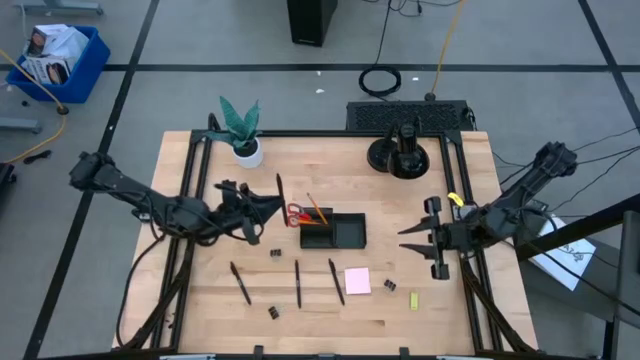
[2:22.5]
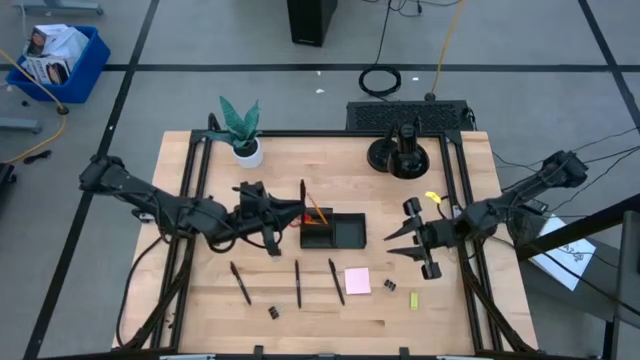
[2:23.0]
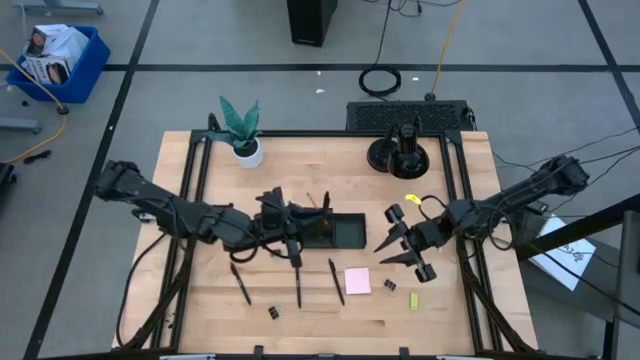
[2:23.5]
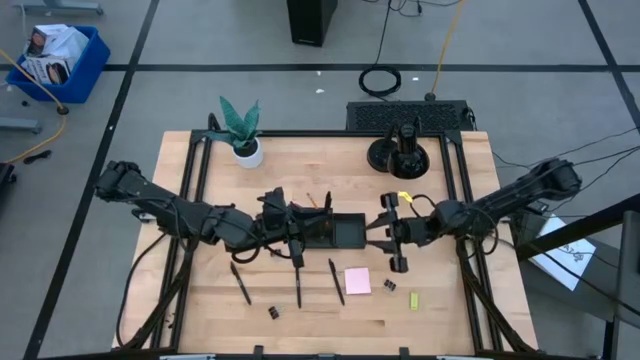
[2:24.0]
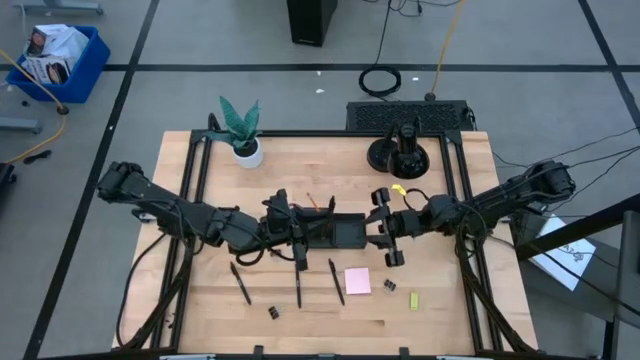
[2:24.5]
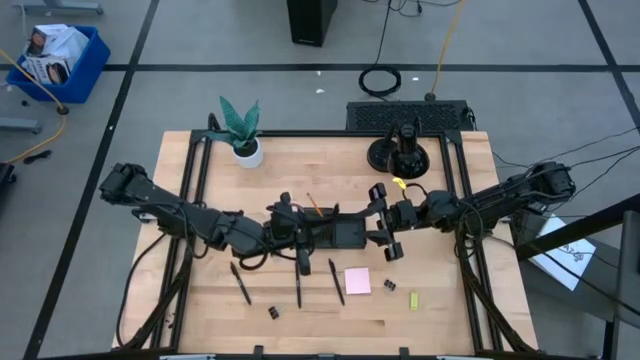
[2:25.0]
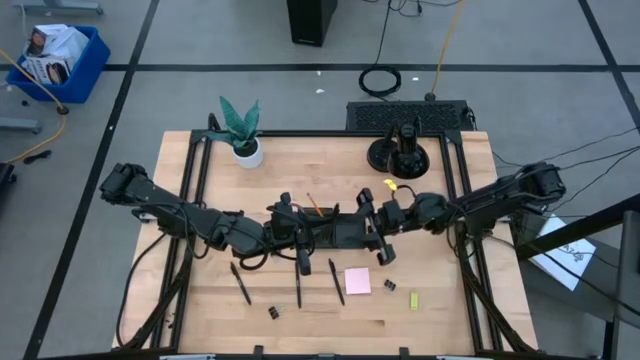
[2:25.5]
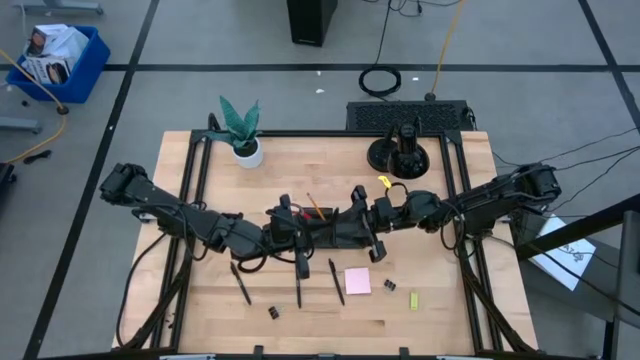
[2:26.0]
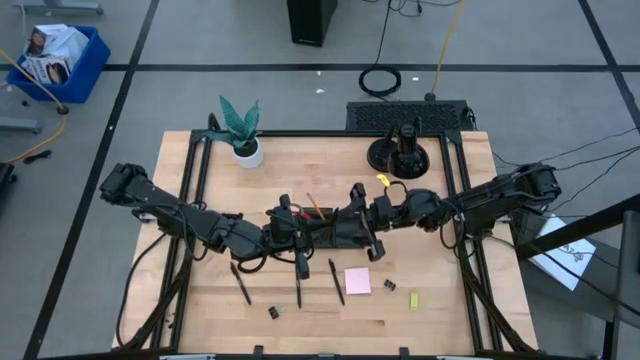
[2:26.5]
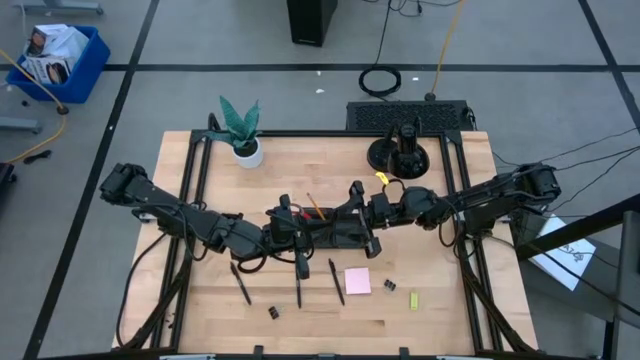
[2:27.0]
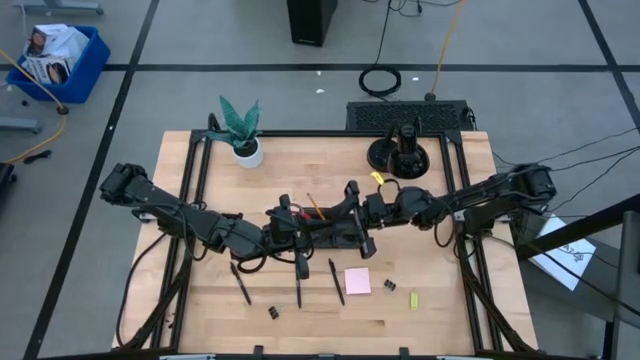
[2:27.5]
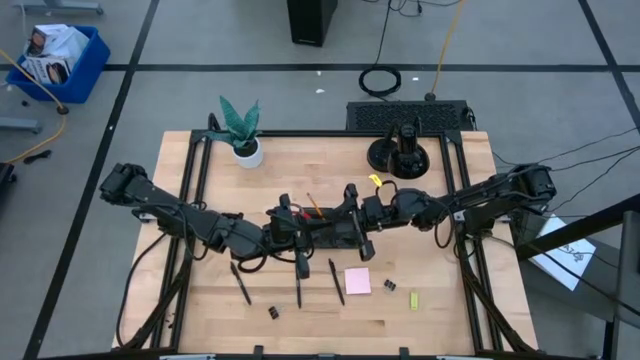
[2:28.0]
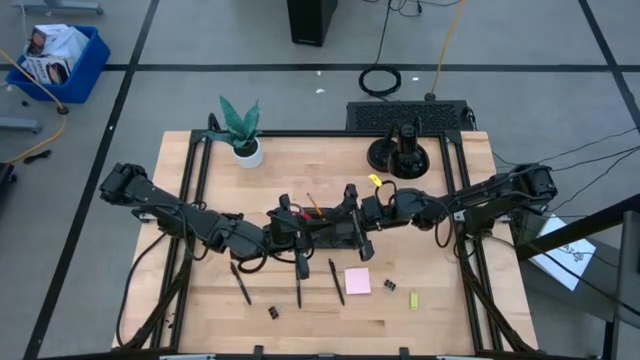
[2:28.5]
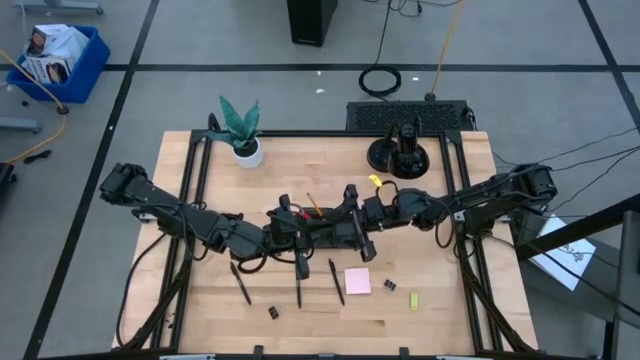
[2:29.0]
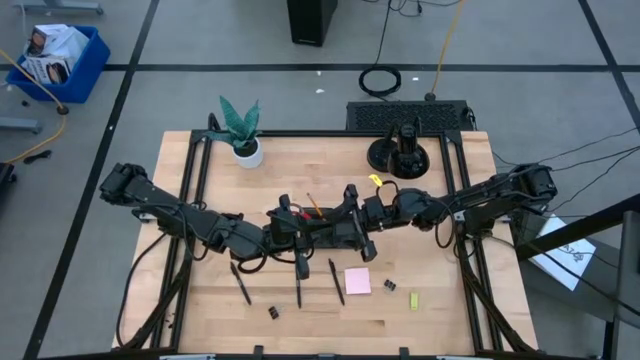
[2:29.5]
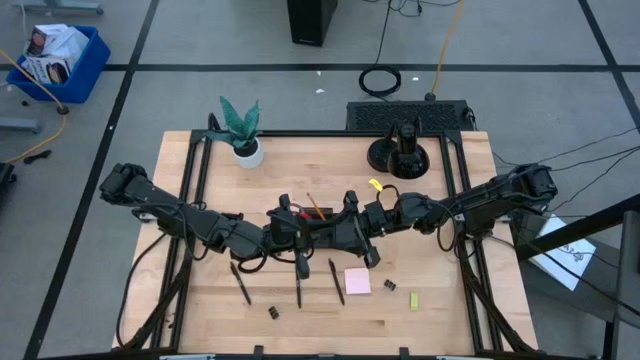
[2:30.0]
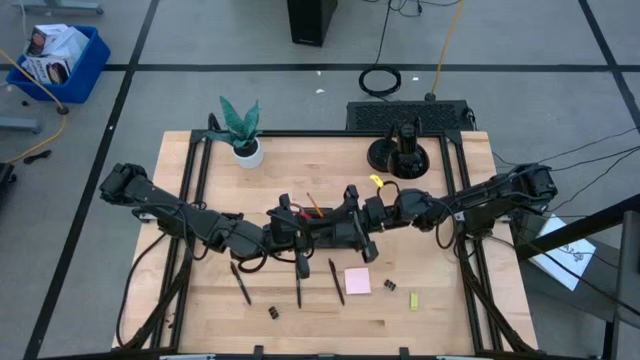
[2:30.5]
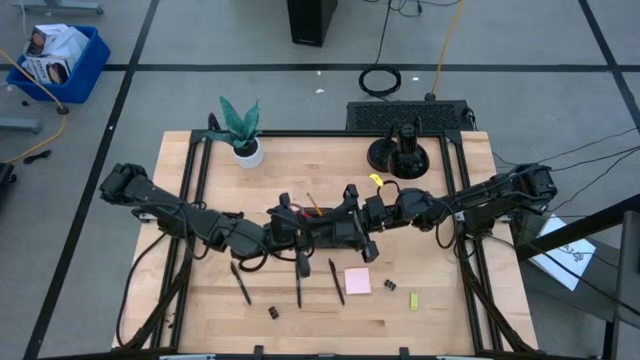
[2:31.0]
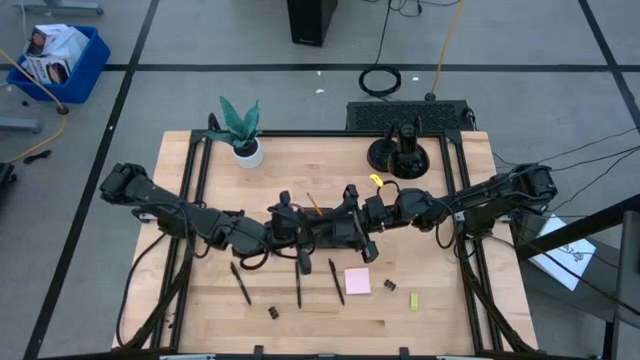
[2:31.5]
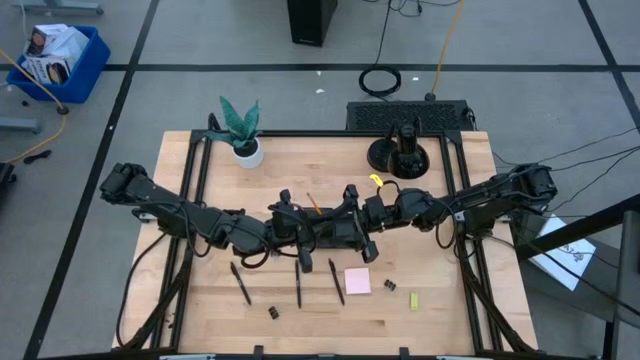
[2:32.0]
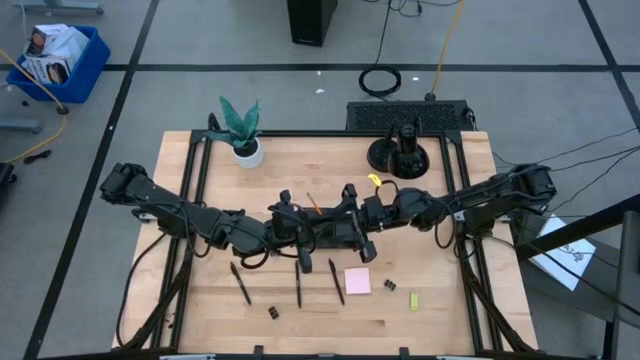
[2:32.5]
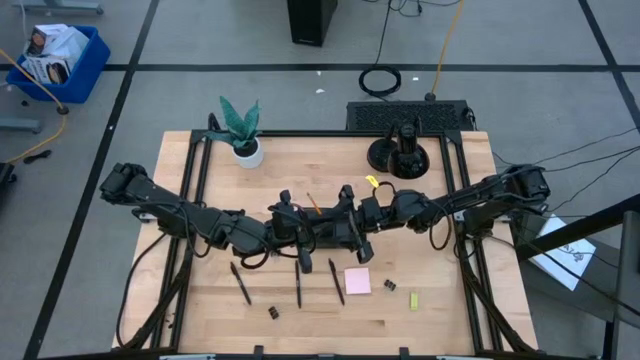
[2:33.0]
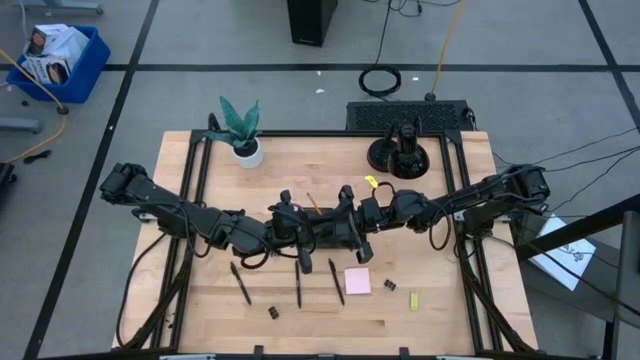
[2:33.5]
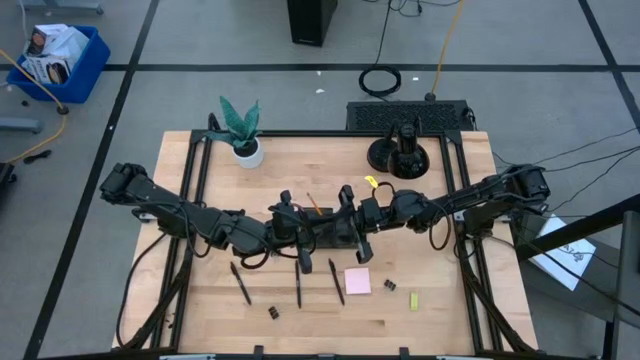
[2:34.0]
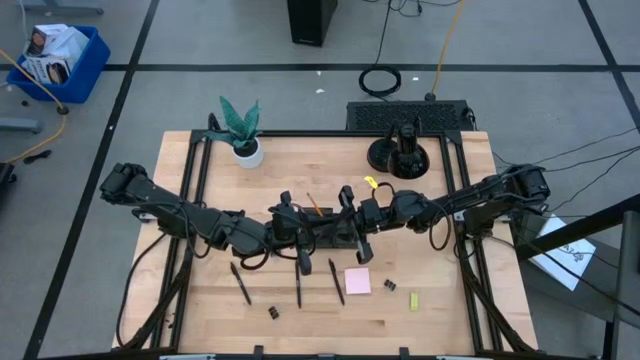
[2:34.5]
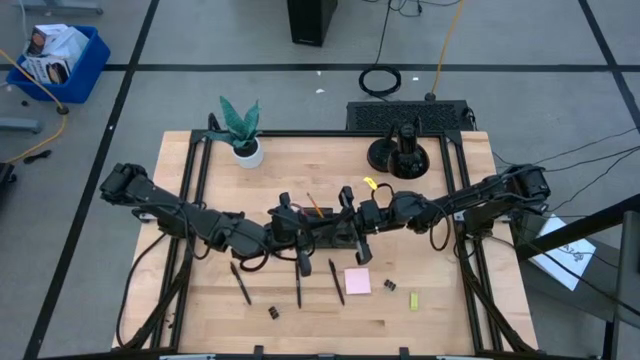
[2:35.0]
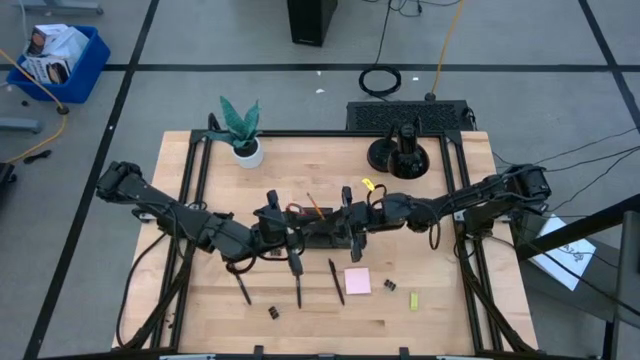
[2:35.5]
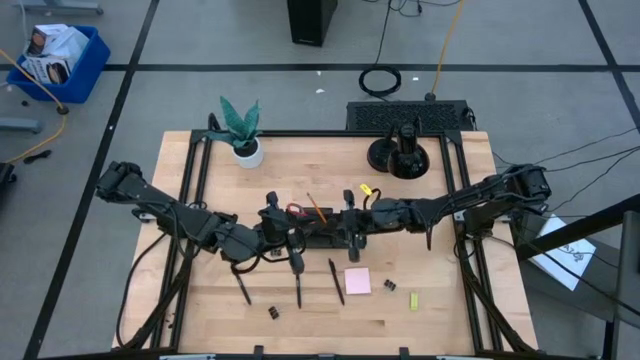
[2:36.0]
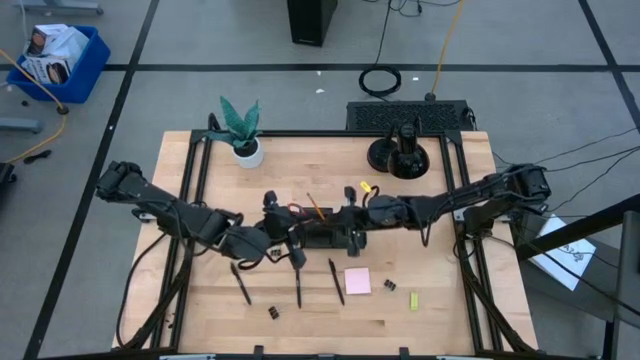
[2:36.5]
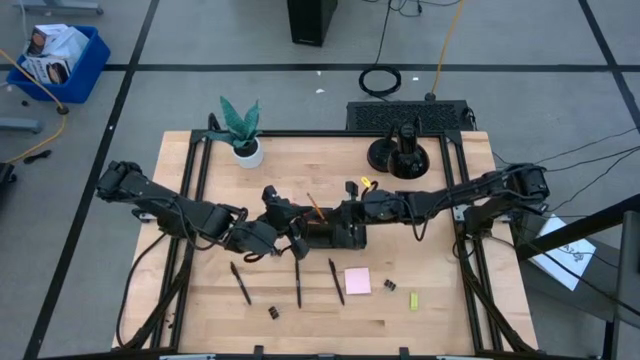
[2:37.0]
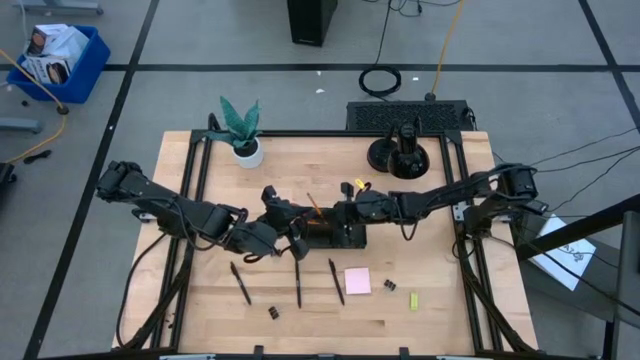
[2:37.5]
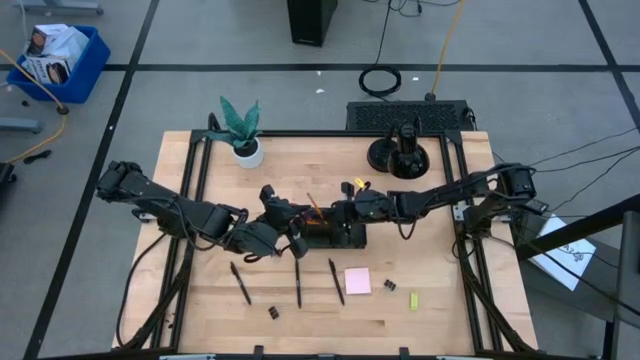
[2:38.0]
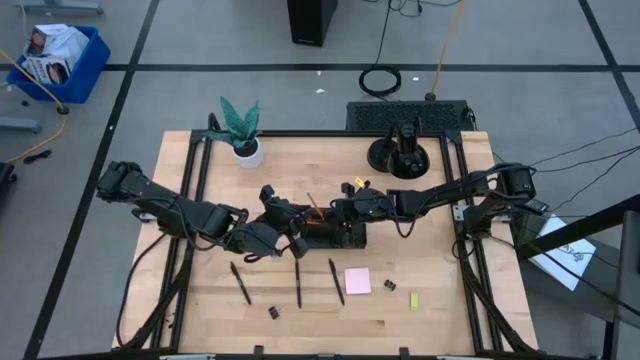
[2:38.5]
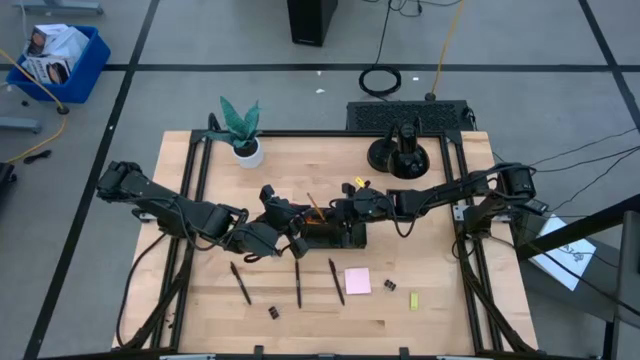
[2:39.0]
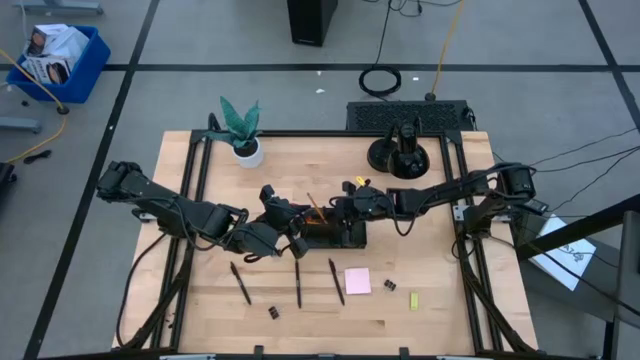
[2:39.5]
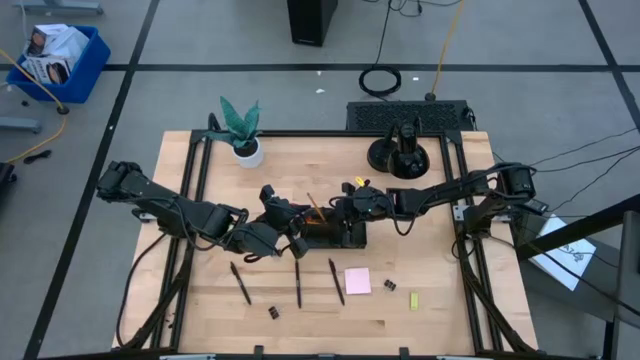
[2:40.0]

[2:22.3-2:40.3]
Task: Pick and place office supplies into organizer
Put the top left black pen into the desk organizer

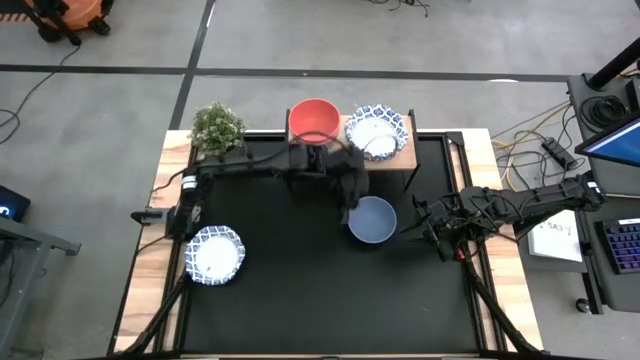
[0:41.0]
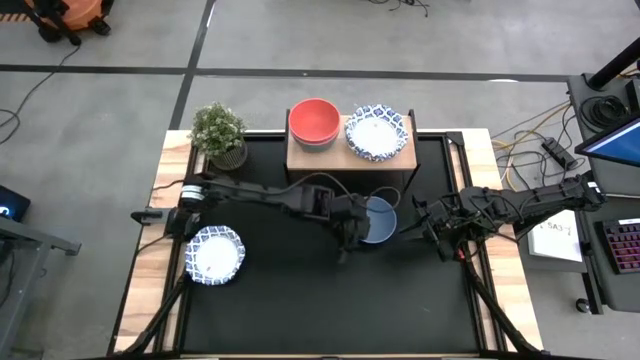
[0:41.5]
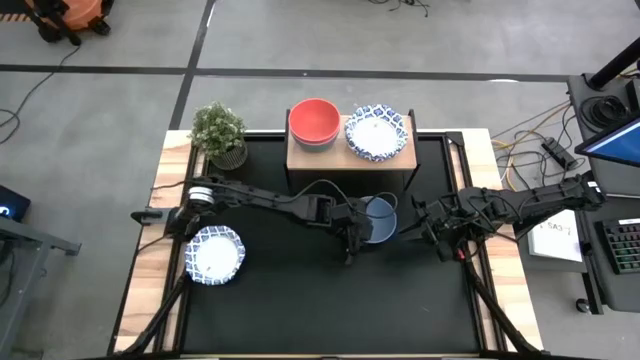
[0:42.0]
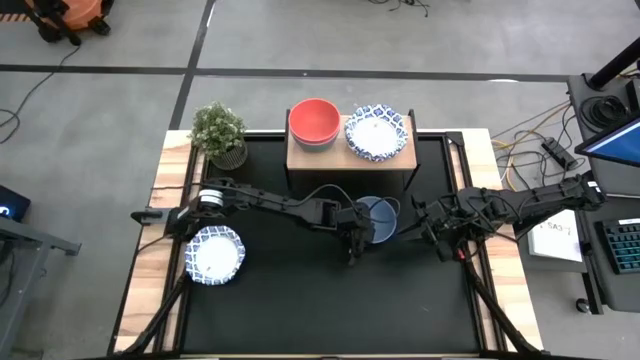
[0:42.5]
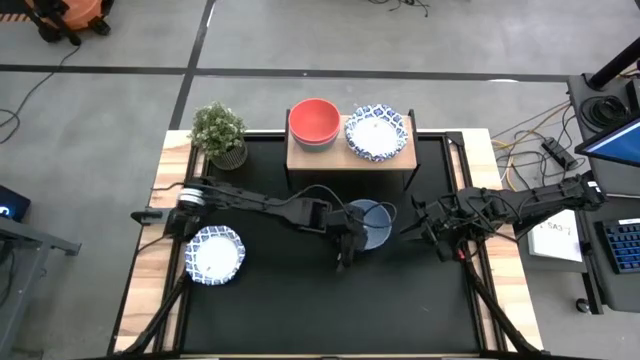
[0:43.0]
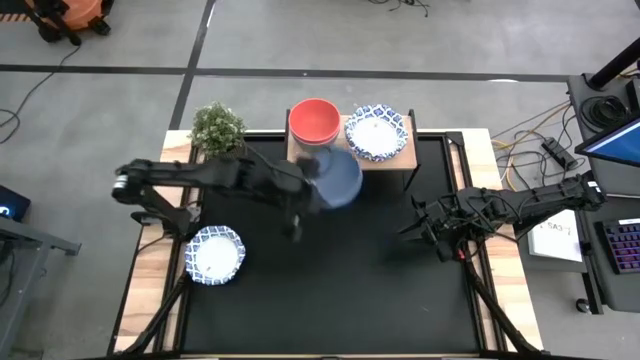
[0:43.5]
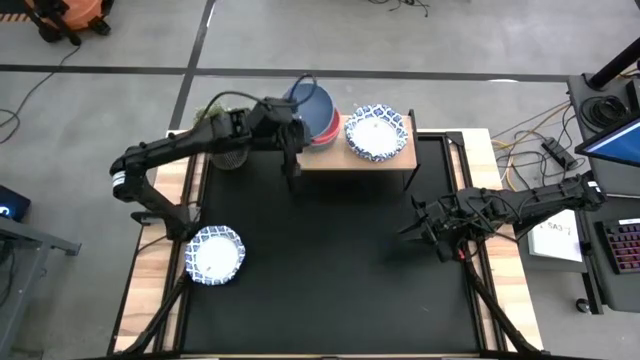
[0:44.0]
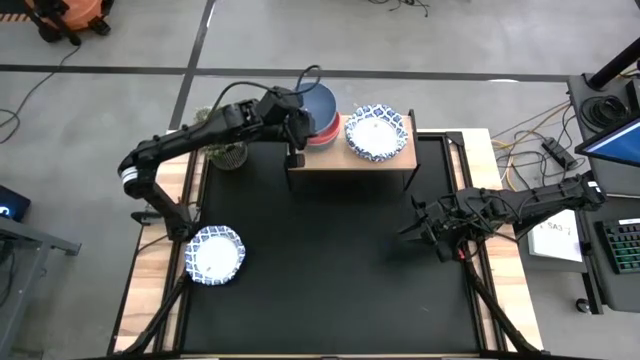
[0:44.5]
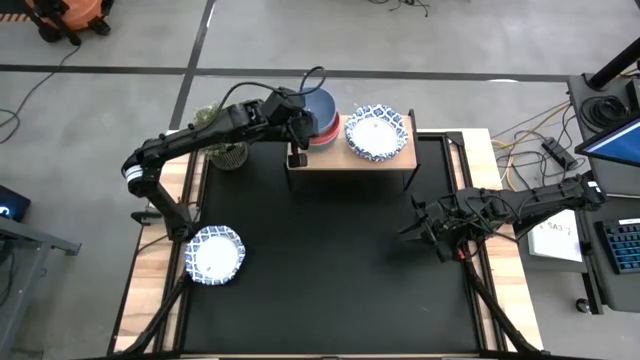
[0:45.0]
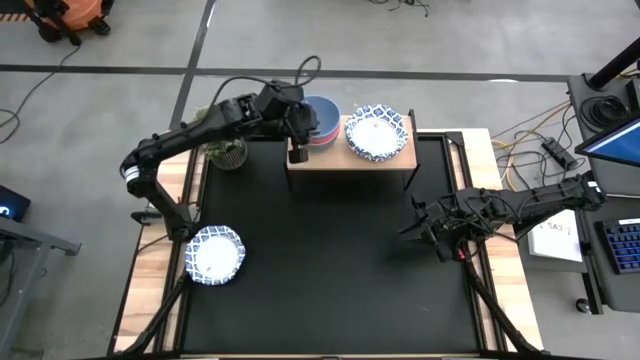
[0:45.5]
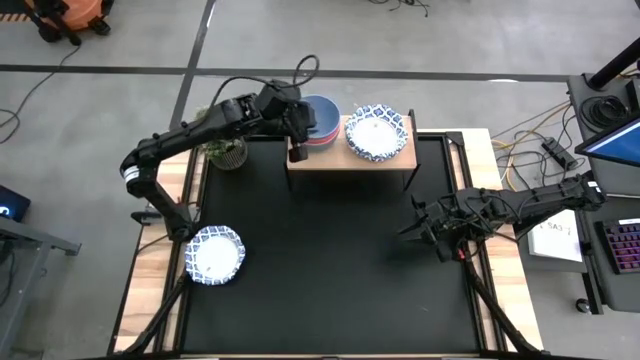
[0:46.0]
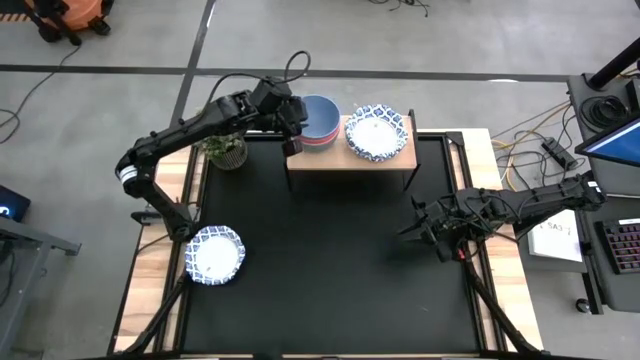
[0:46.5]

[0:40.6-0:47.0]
Task: Place and stack bowls onto a shelf
Stack the blue plastic bowl on the orange plastic bowl on the shelf
